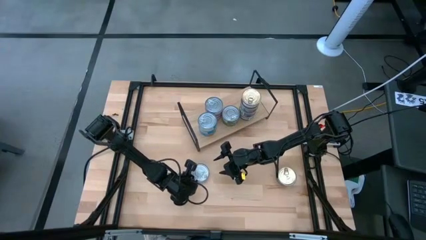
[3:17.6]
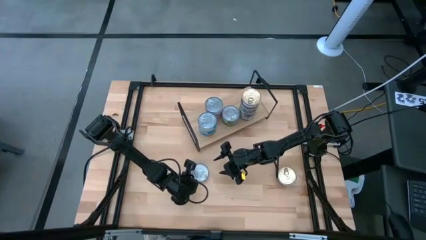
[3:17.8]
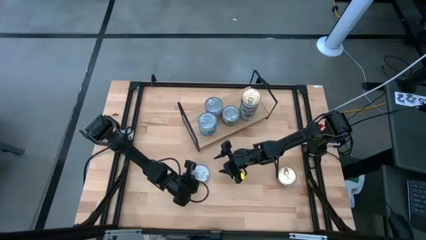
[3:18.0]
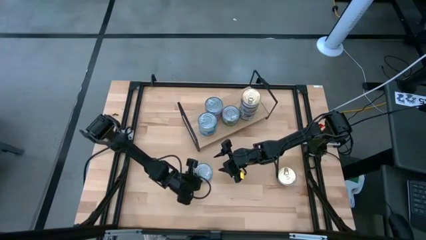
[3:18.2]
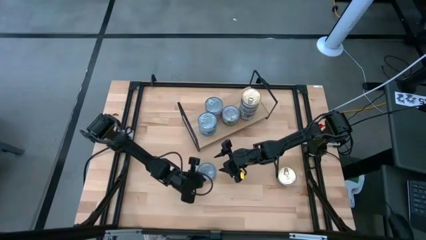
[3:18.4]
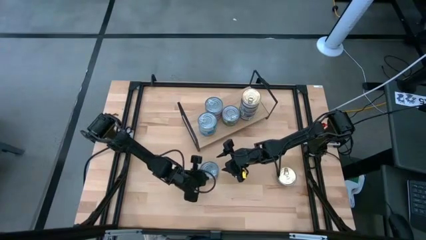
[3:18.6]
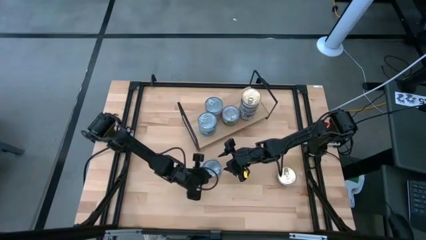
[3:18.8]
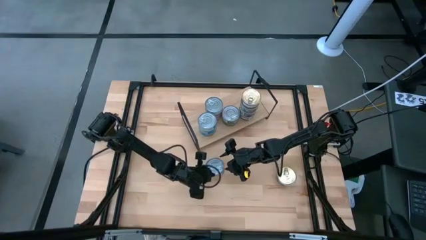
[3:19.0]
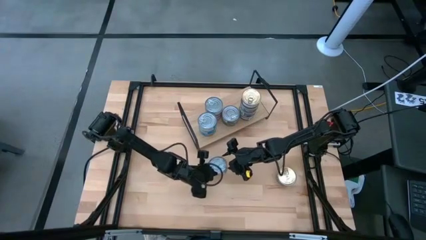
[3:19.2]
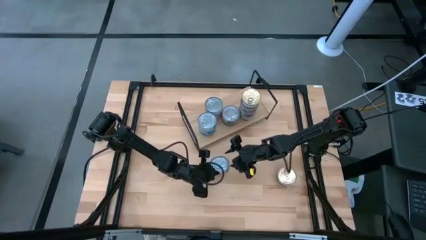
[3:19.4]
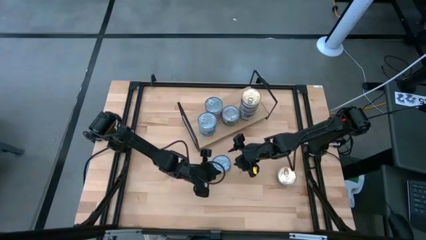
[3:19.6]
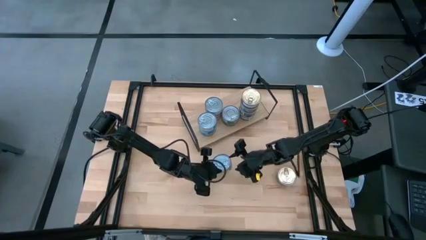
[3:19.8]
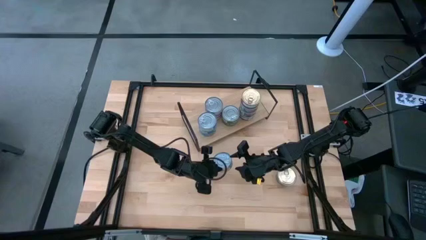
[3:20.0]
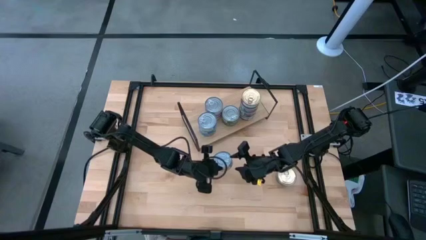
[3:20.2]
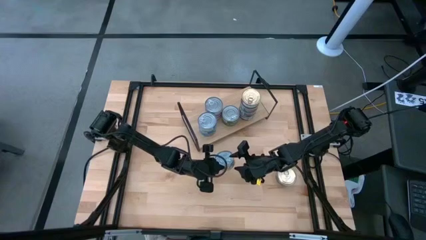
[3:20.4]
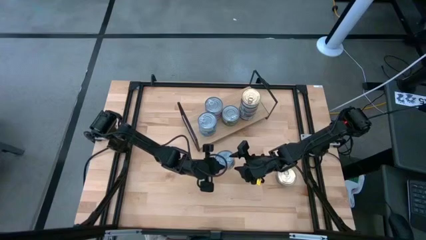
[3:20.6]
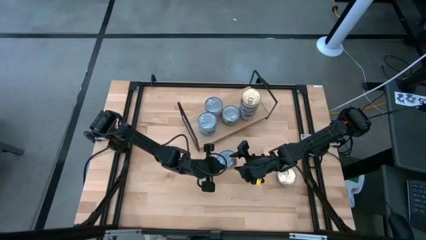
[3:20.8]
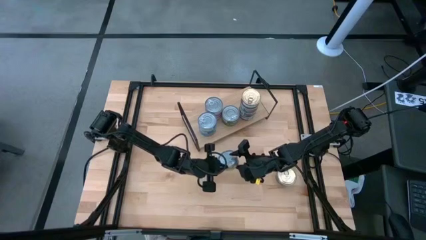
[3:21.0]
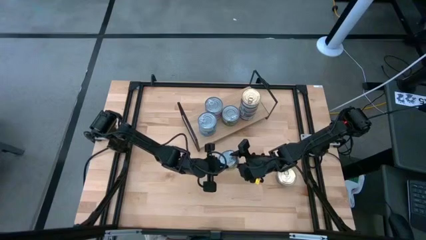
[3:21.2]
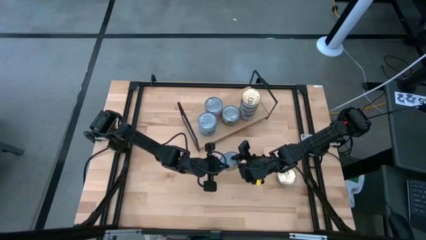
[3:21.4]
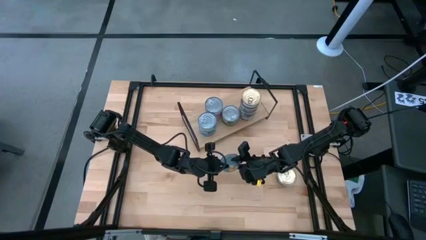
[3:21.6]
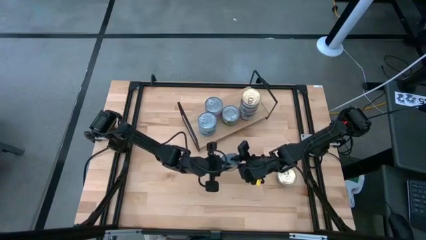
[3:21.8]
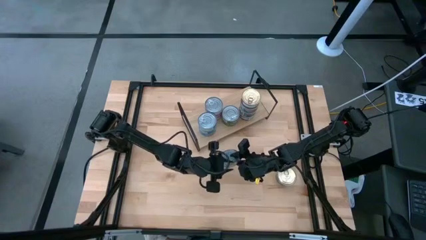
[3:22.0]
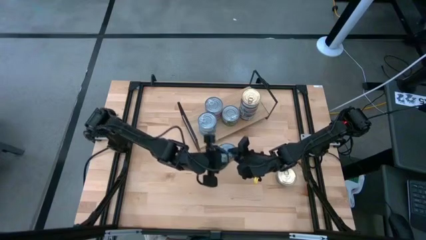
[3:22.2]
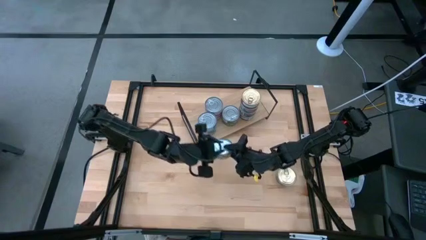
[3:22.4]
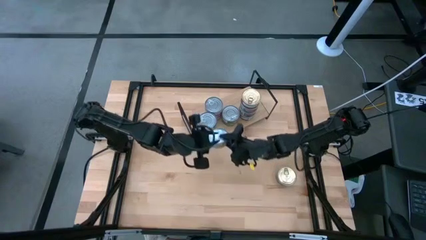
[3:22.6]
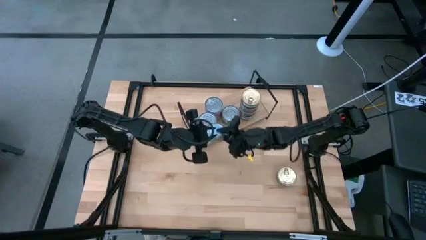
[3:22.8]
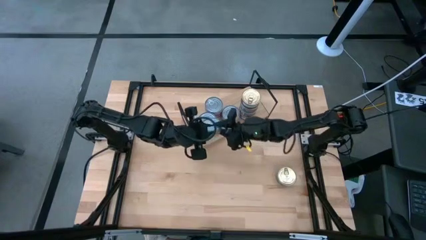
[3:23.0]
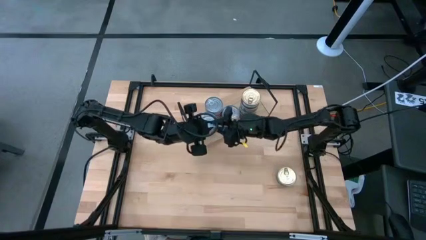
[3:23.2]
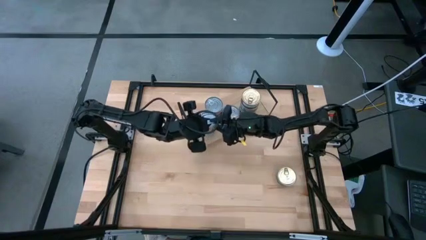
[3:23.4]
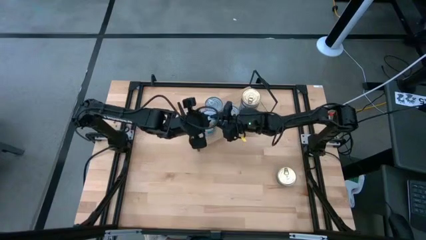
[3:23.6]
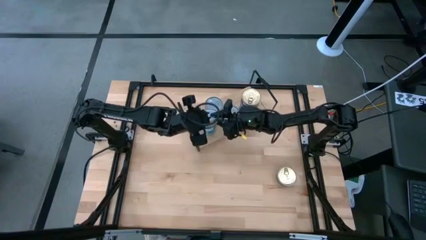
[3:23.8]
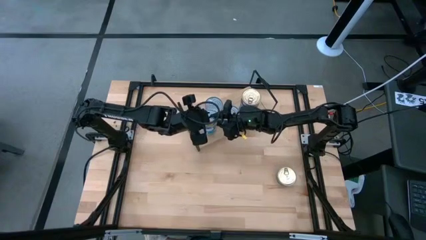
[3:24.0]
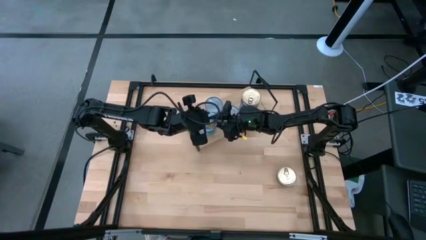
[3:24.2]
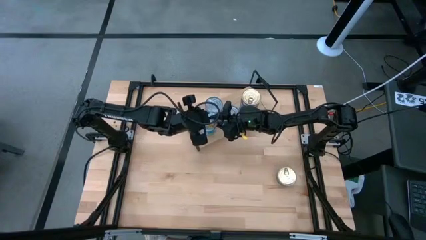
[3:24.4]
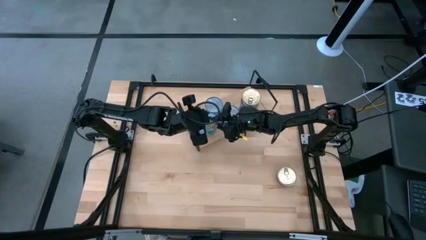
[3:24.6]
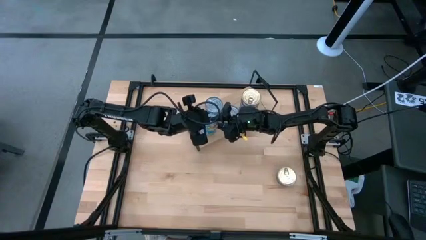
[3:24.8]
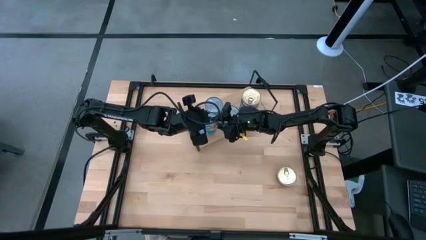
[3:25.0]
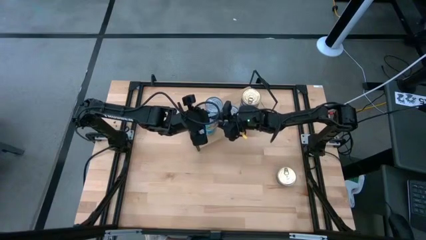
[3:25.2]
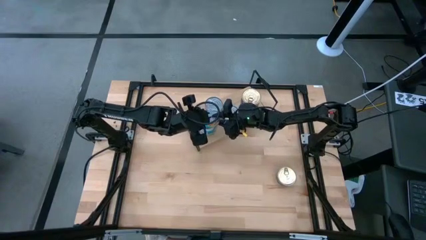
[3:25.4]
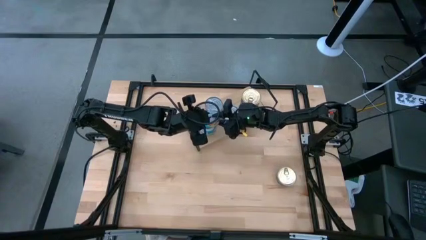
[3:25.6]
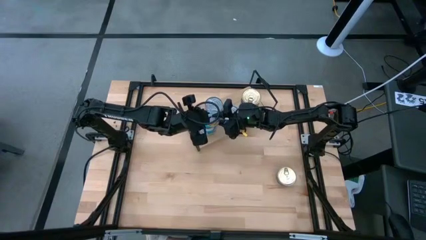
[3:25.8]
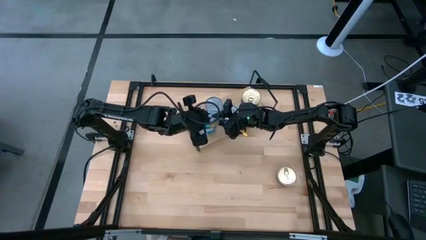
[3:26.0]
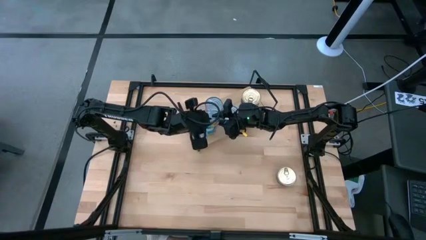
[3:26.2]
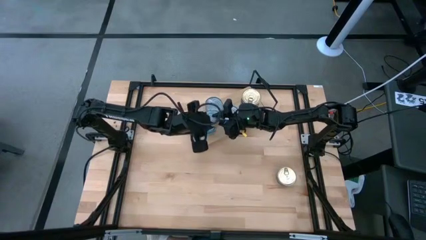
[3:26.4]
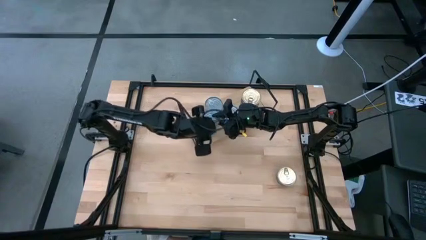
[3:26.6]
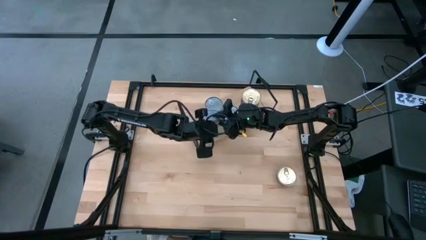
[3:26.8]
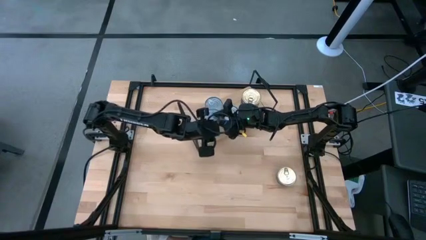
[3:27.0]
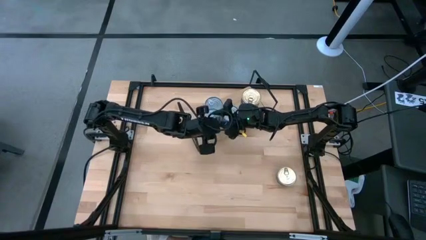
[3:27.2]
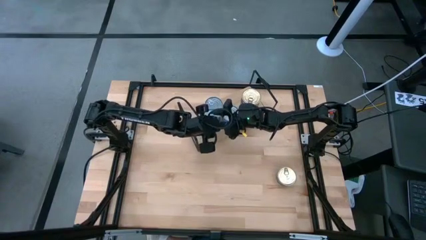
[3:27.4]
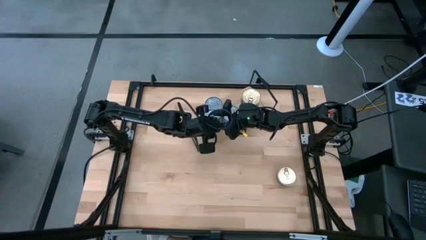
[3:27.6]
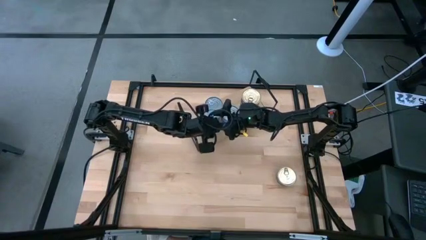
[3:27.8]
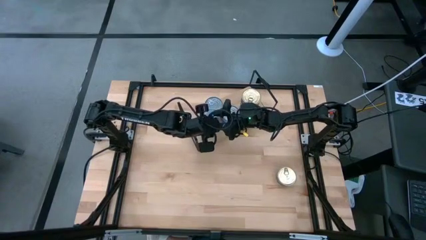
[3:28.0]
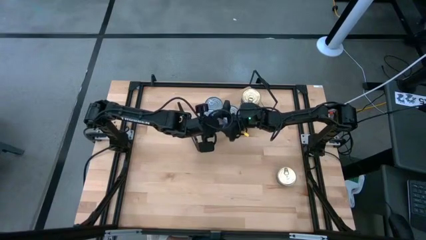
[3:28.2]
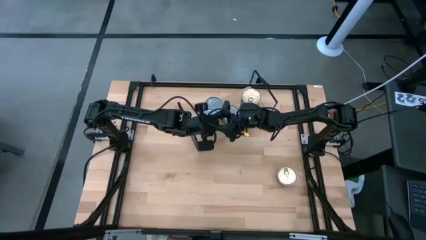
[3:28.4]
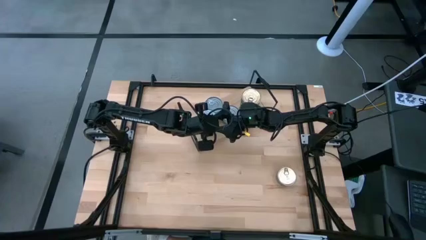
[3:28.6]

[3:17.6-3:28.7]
Task: Stack canned seafood by type on shelf
Stack the yellow and blue tuna can on the shelf on top of the other yellow and blue tuna can

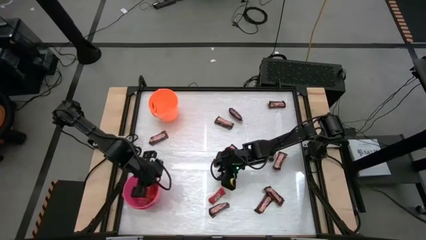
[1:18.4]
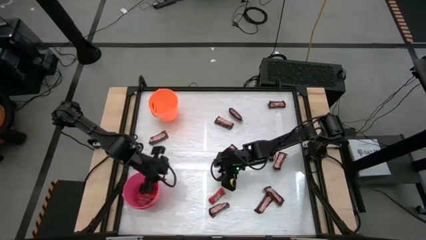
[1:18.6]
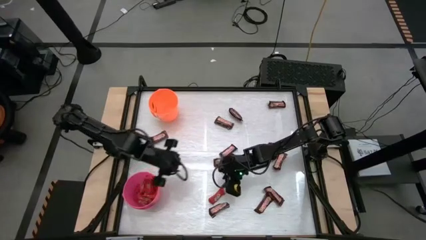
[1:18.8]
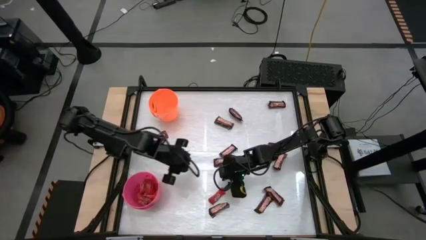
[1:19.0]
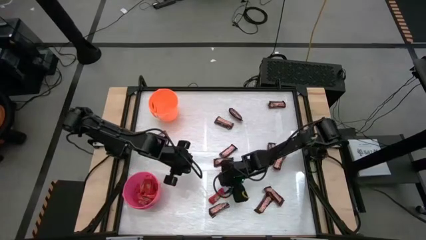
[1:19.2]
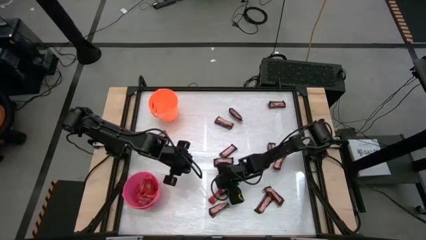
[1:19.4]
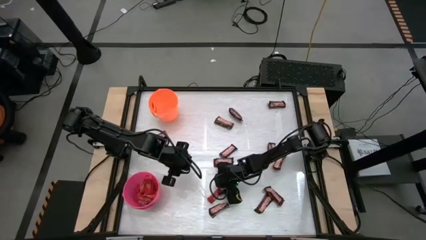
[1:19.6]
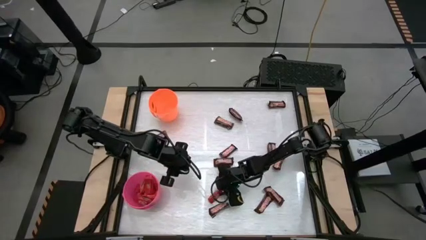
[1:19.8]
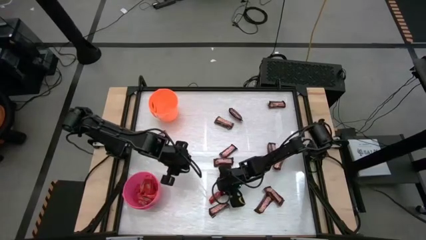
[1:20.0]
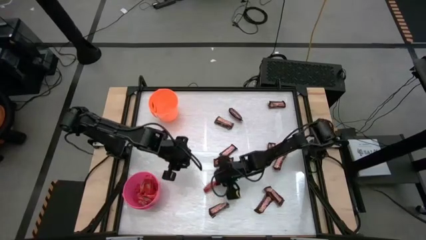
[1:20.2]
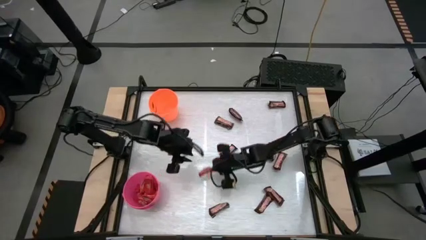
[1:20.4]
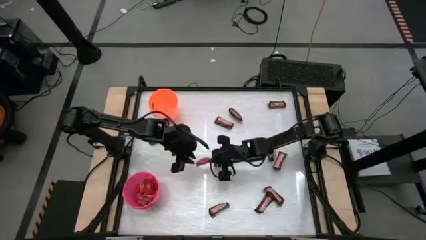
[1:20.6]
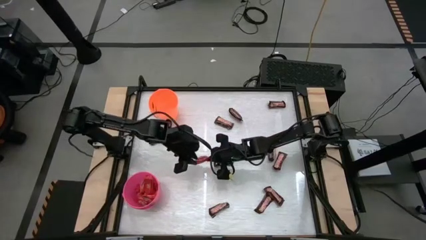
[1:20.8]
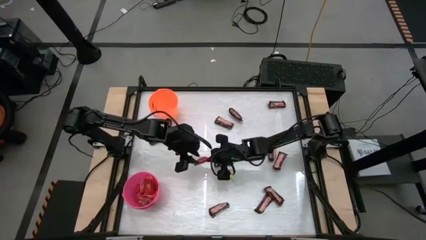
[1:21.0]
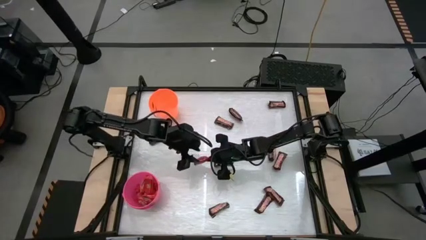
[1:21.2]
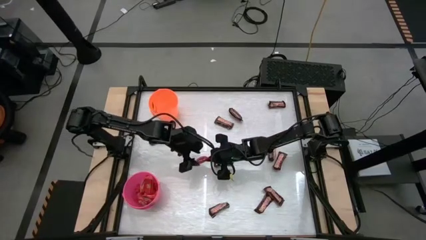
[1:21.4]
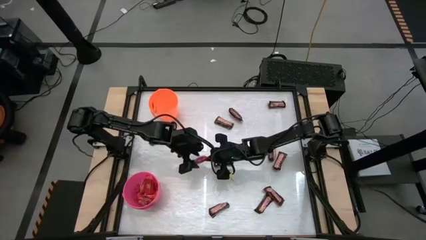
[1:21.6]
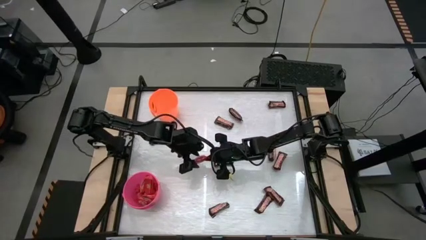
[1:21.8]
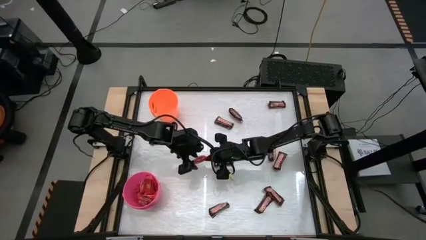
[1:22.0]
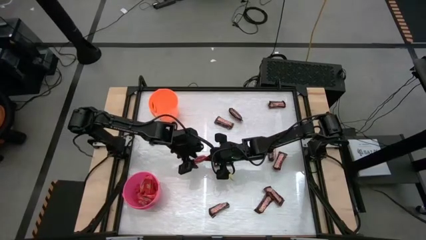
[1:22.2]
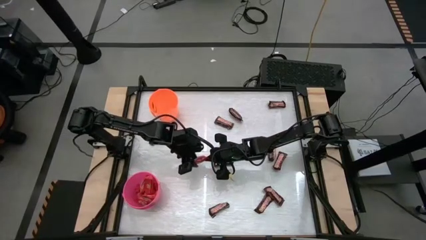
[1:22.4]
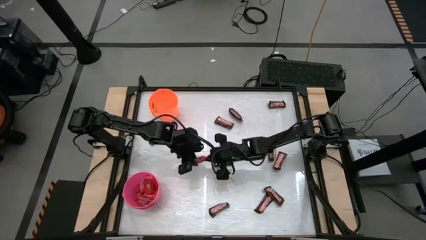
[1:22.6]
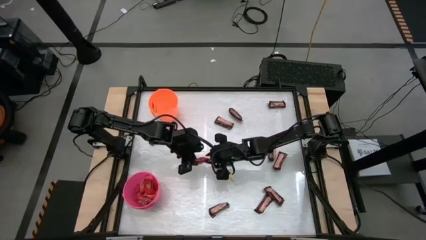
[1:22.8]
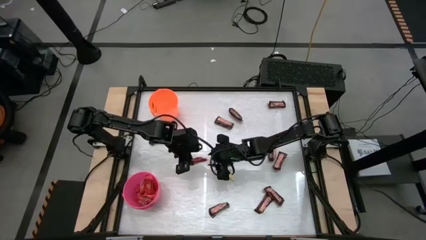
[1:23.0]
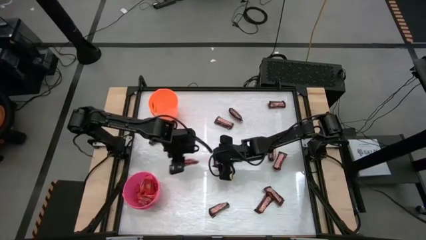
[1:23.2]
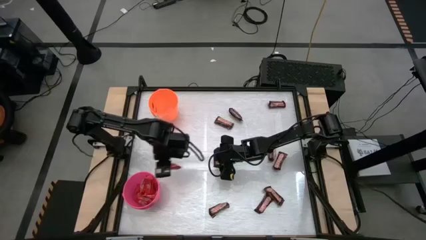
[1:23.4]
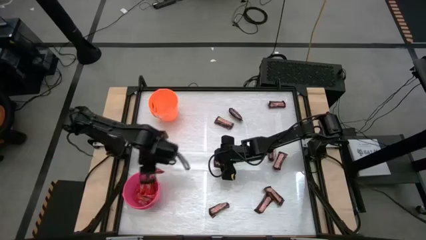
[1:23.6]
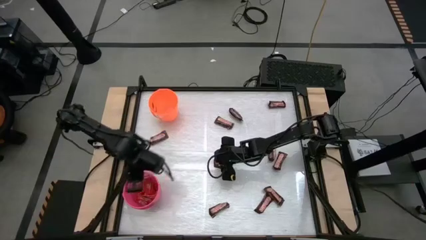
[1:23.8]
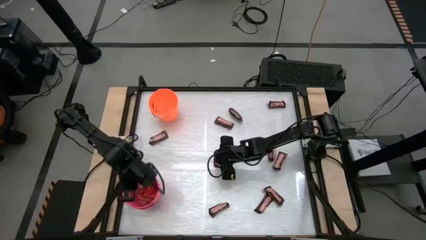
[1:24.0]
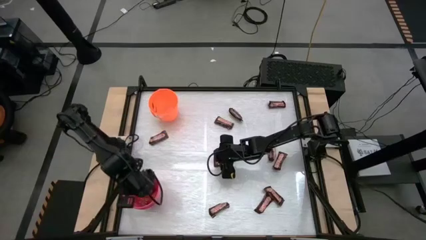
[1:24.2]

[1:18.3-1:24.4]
Task: Sort candy by brand, put in halloween buckets
Put the red chocolate bar into the pink bucket
